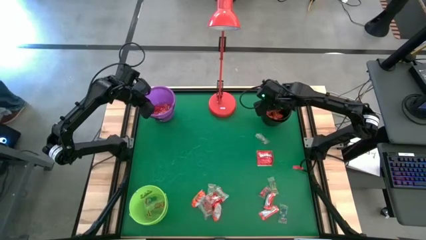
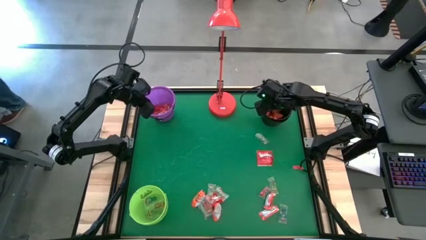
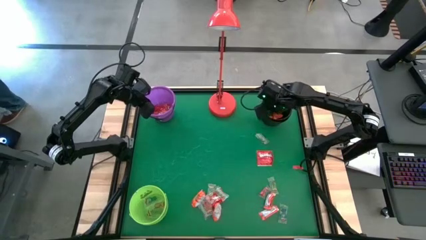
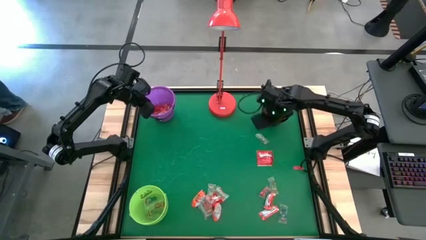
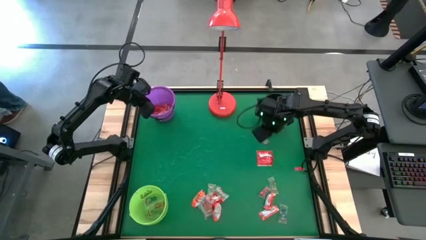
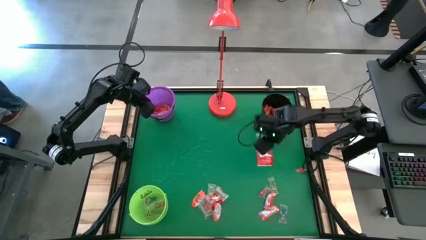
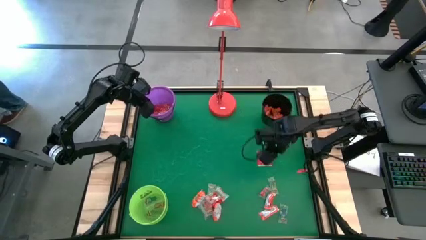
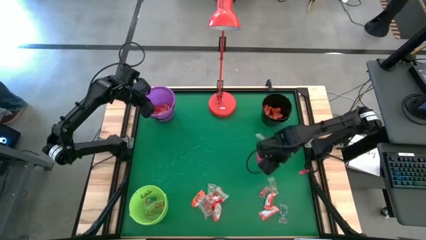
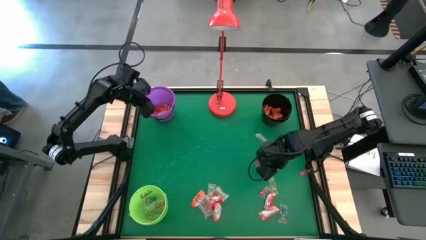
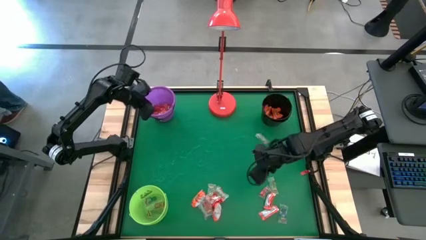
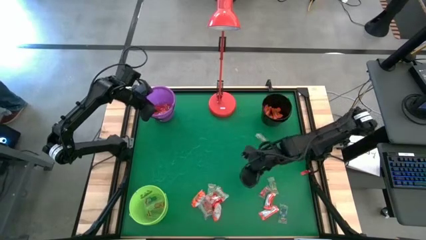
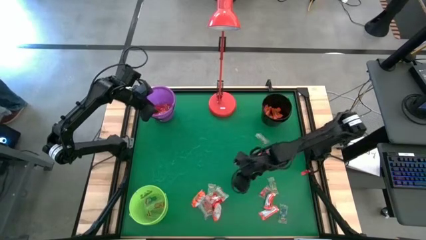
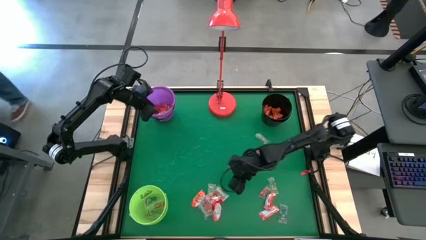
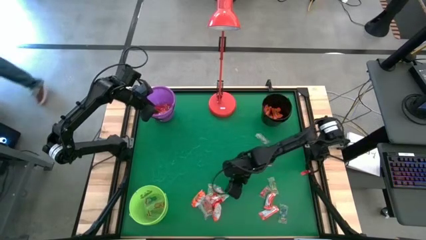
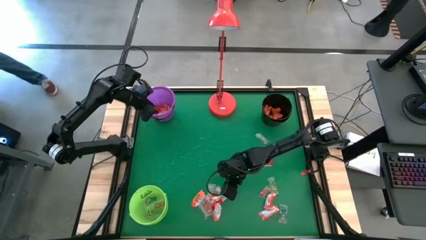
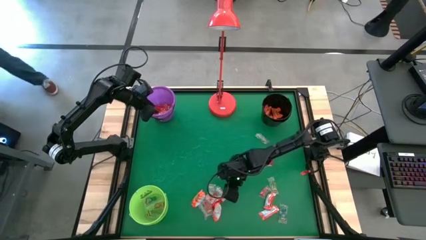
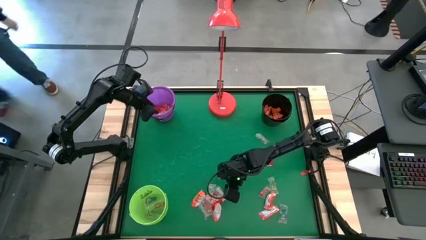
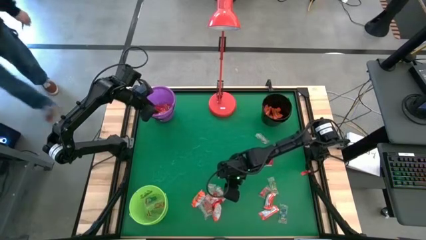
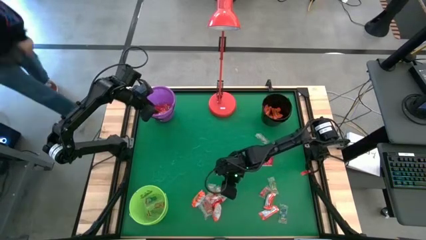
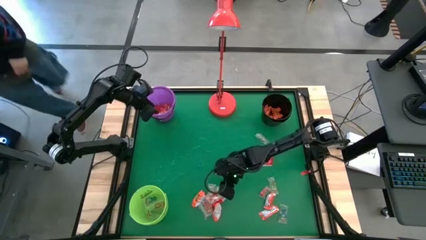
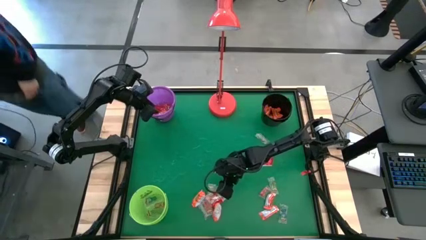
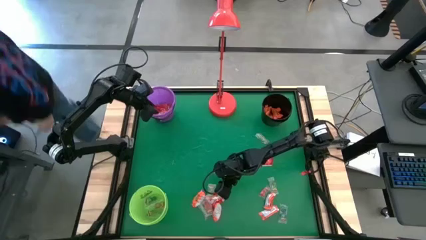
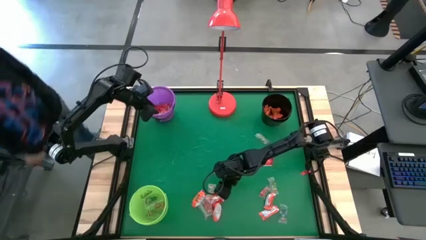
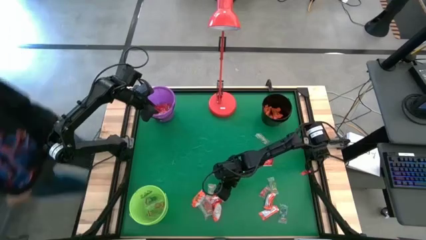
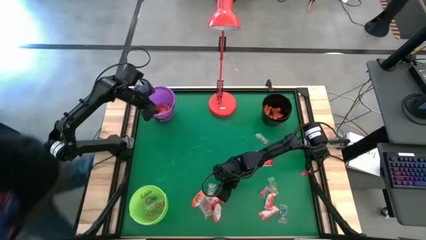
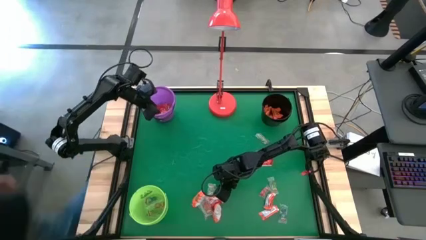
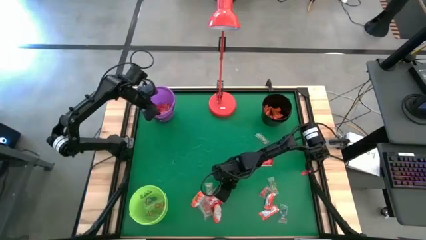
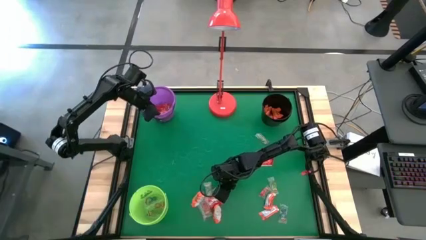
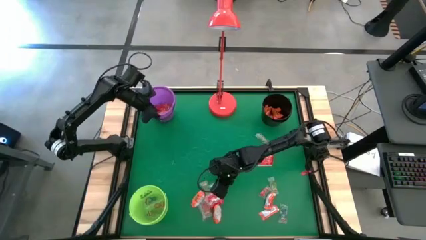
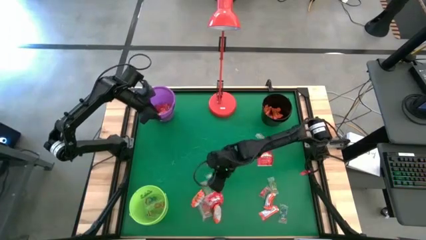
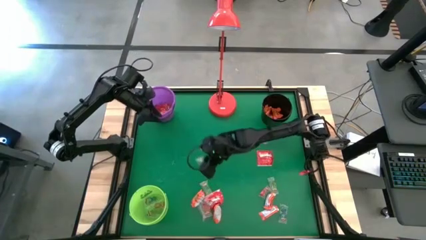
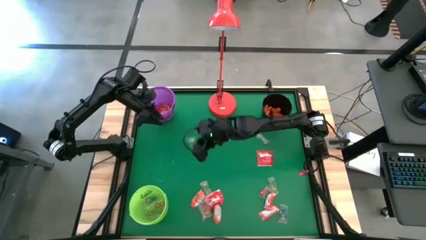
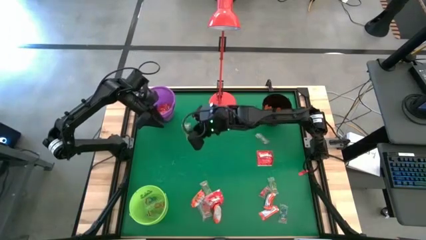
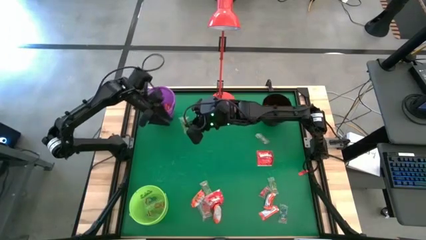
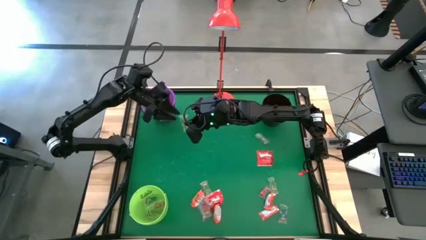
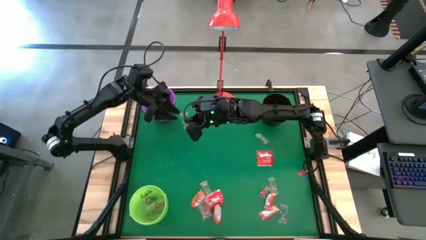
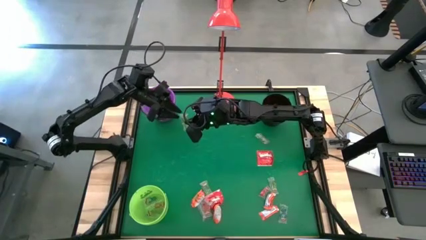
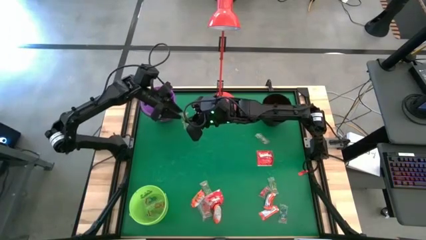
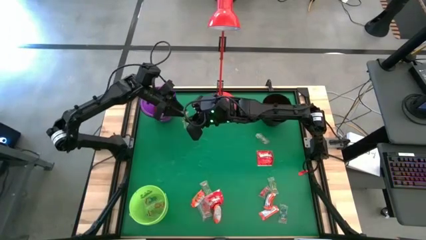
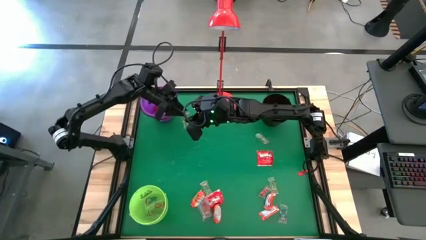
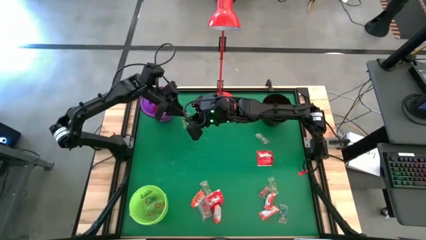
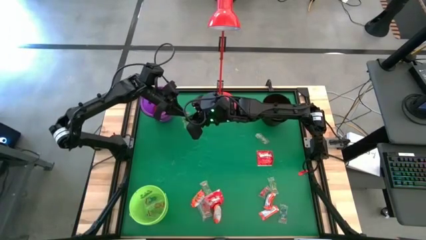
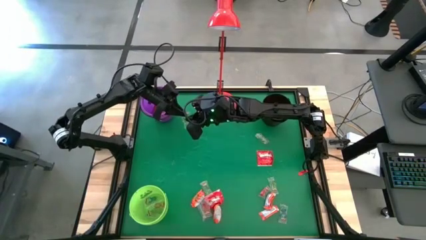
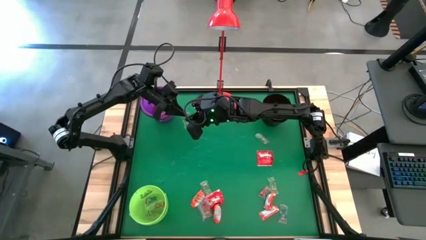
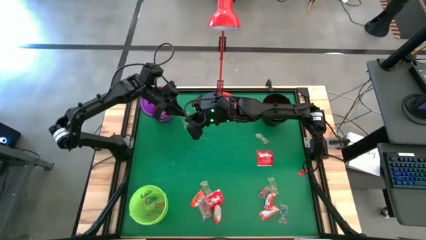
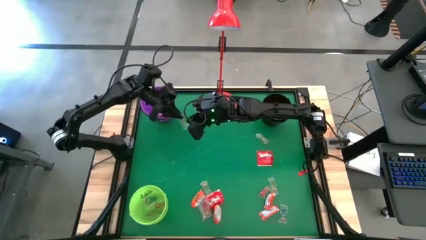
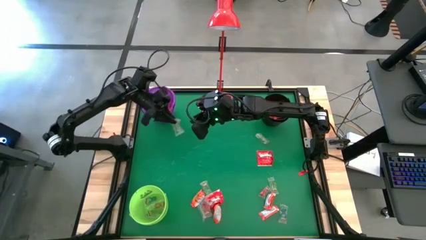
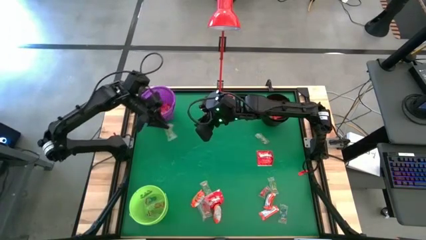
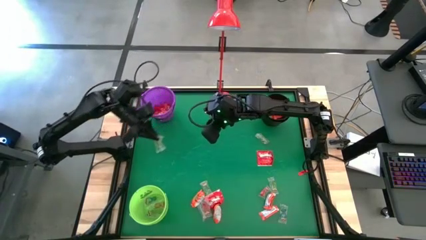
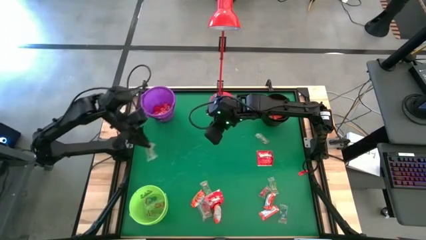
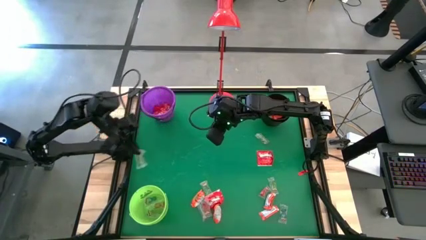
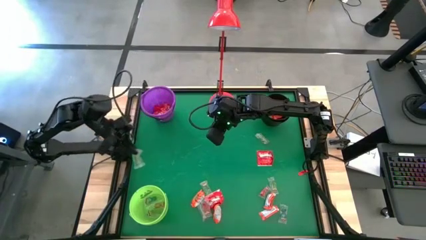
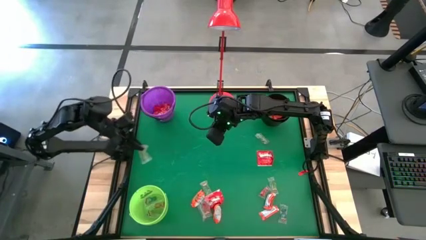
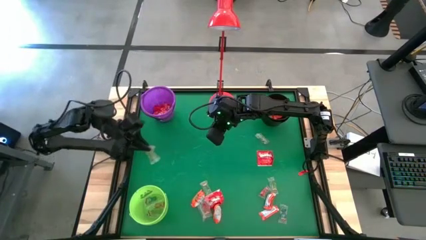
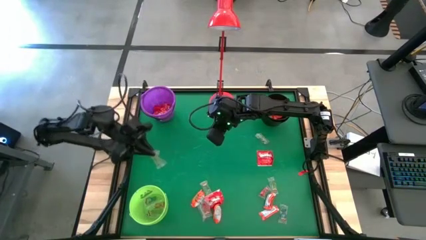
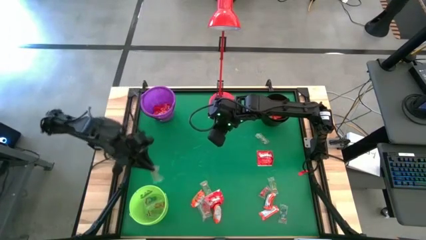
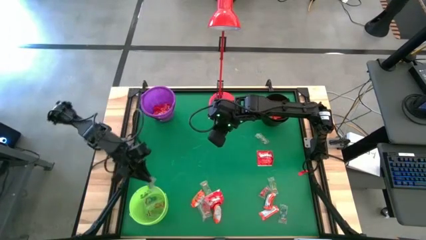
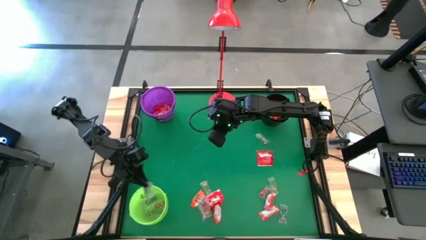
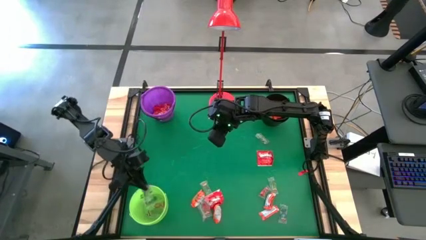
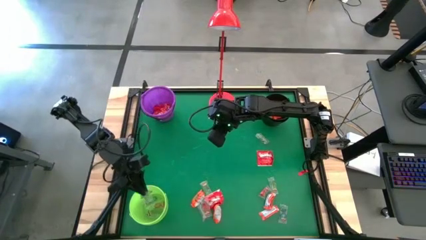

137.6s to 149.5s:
Task: Sort candy
Put the green gummy into the light green bucket
